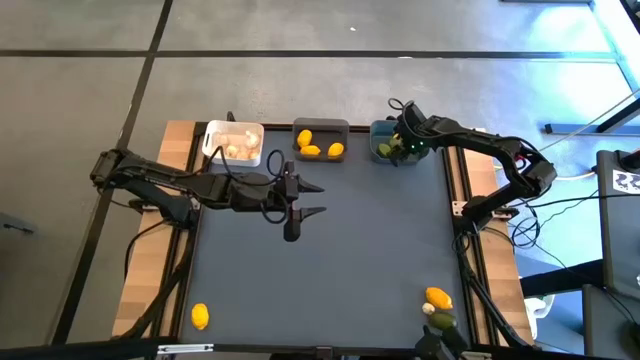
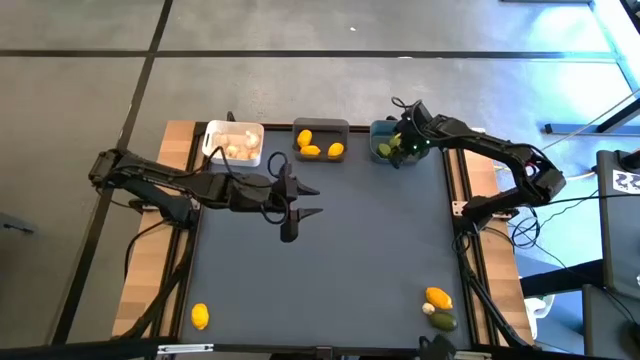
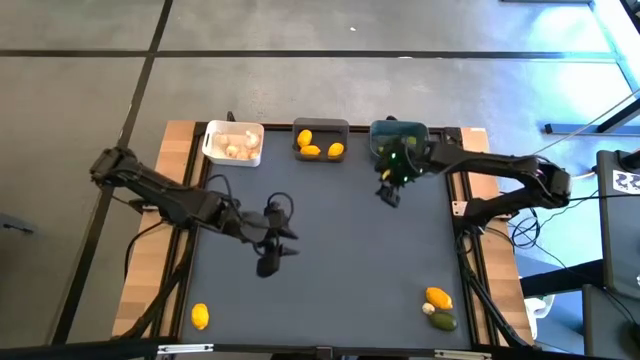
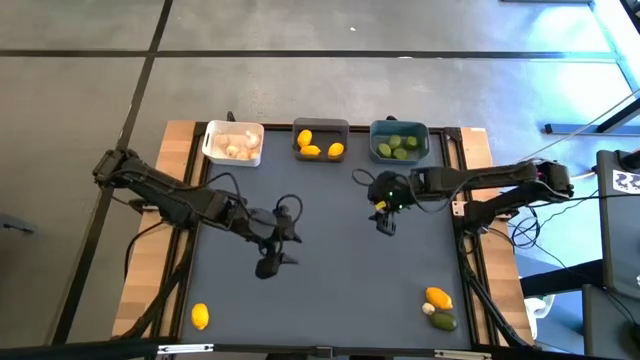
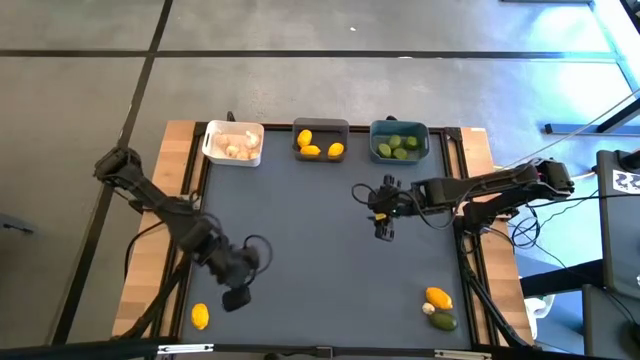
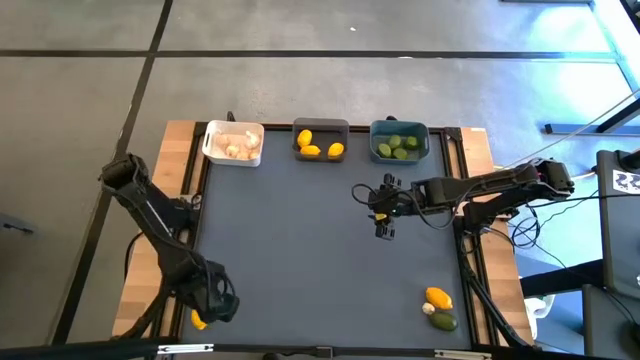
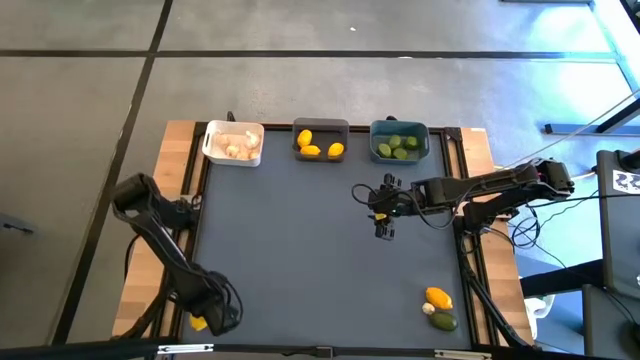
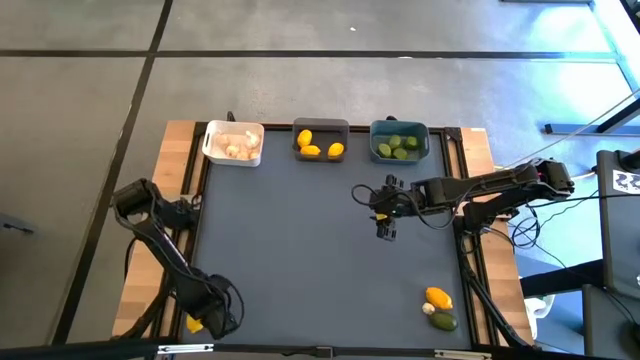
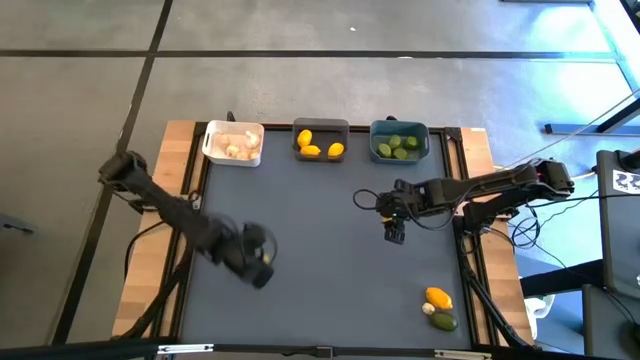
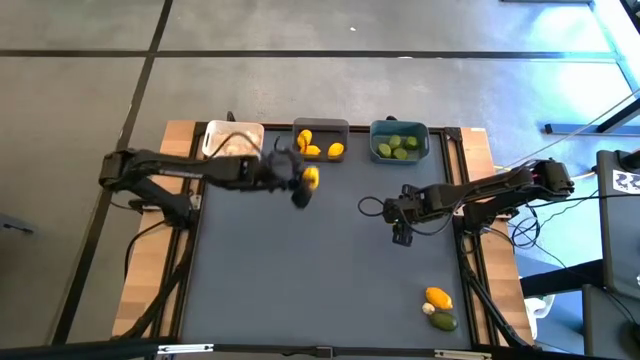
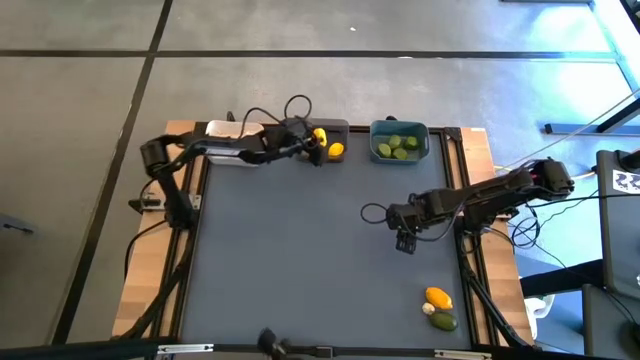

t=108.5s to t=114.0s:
Task: Sort produce into baskets
Put the lemon into the black bin

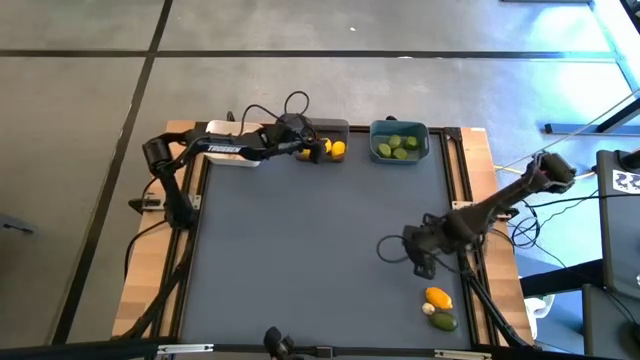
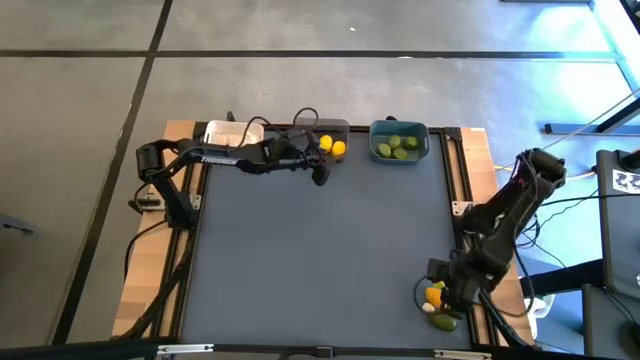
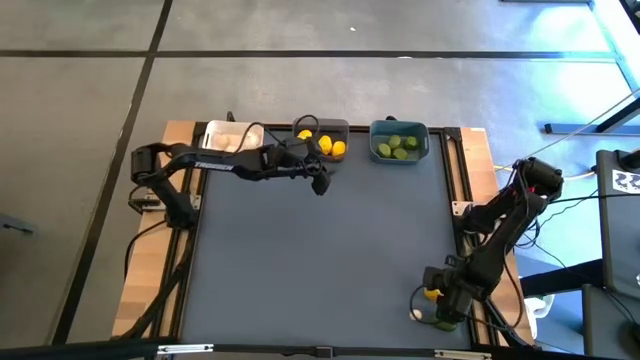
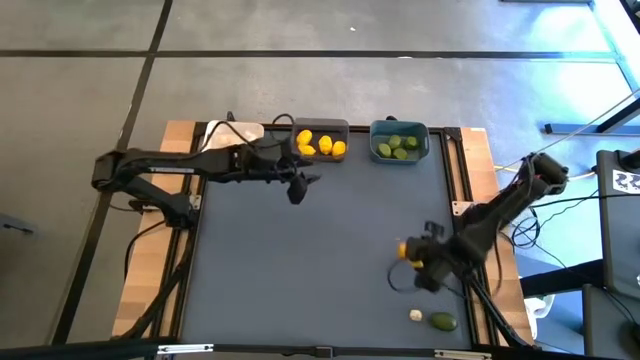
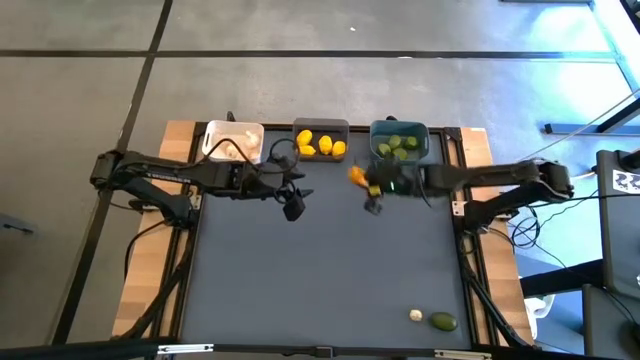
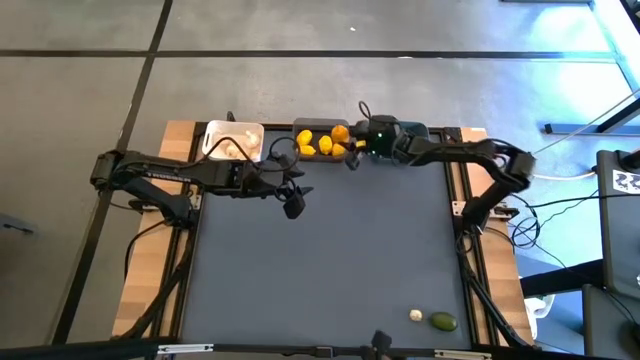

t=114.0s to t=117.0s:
Put the lemon into the black bin

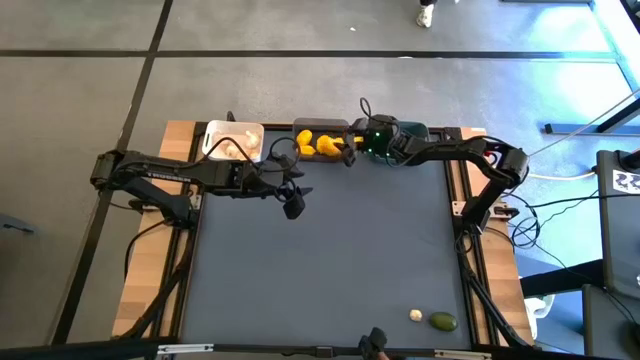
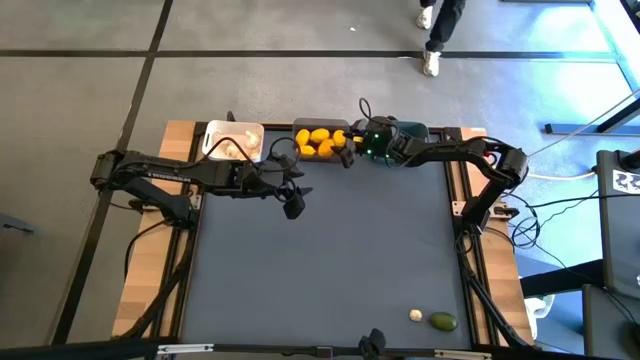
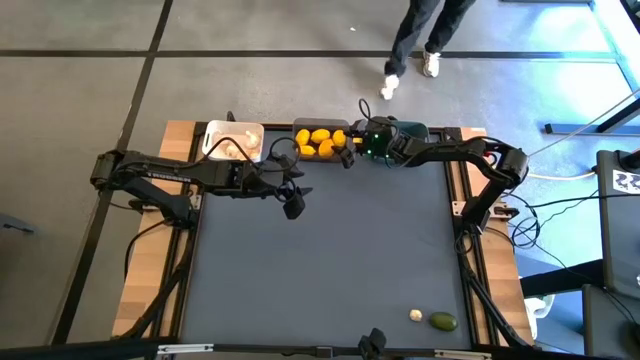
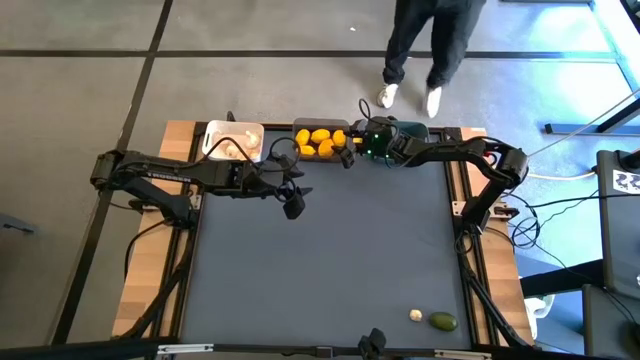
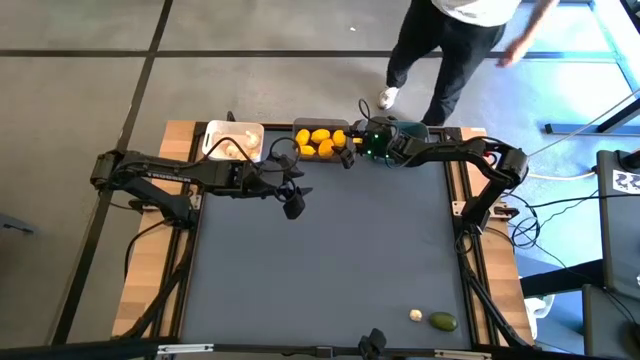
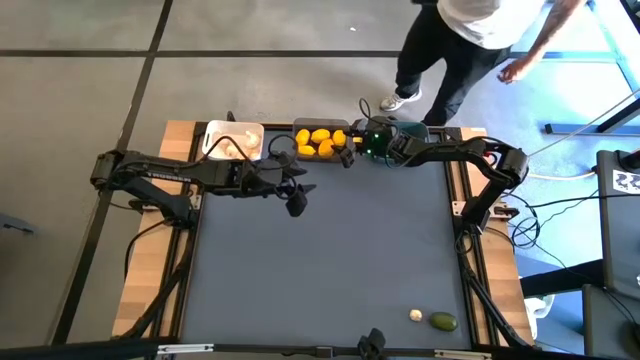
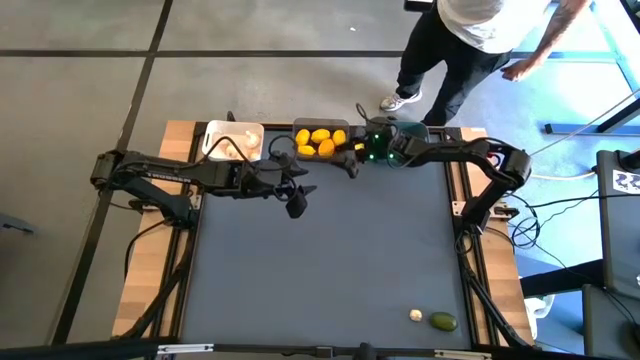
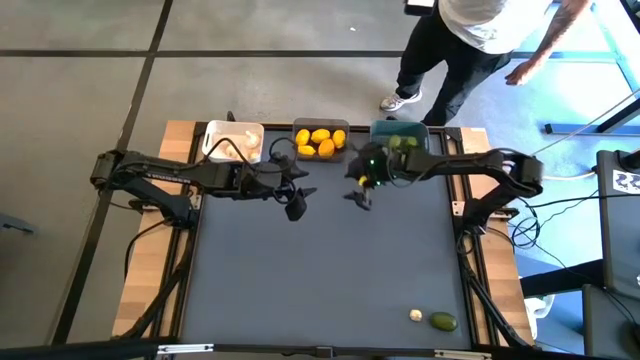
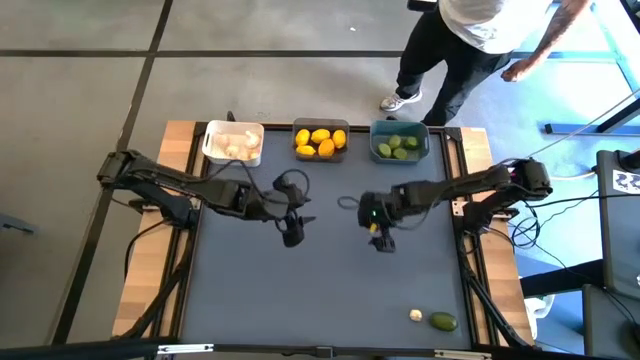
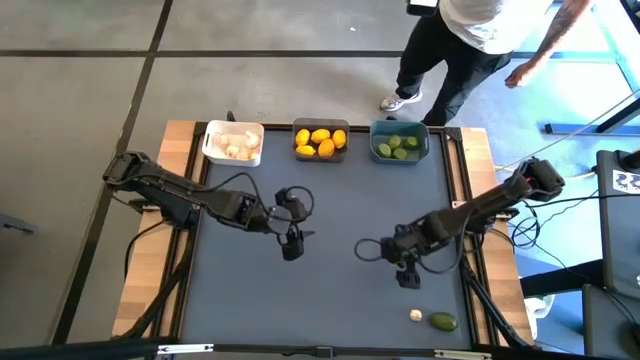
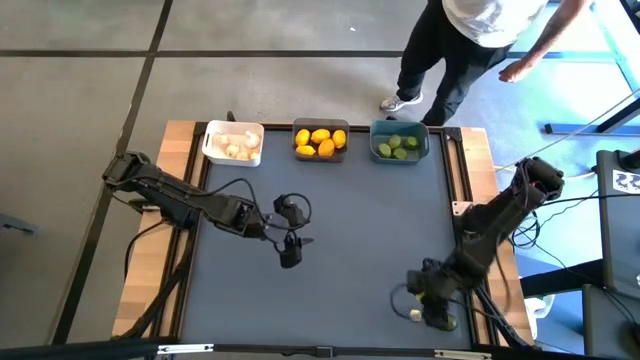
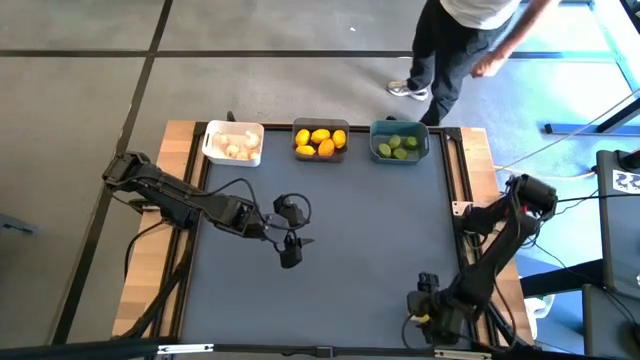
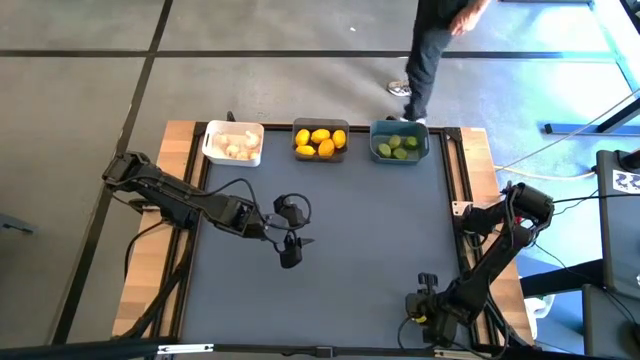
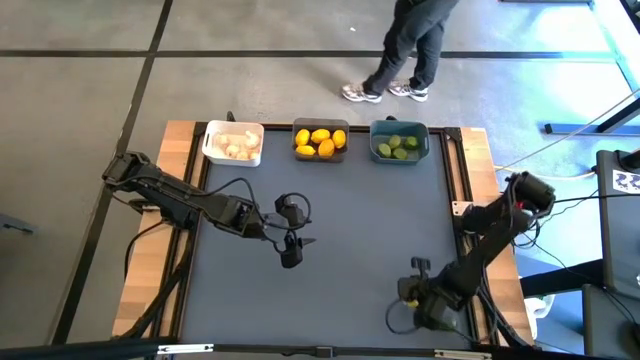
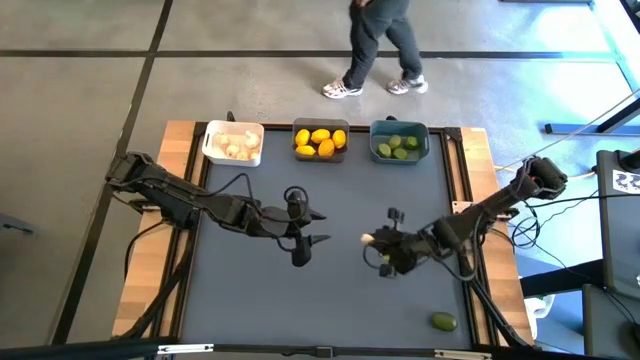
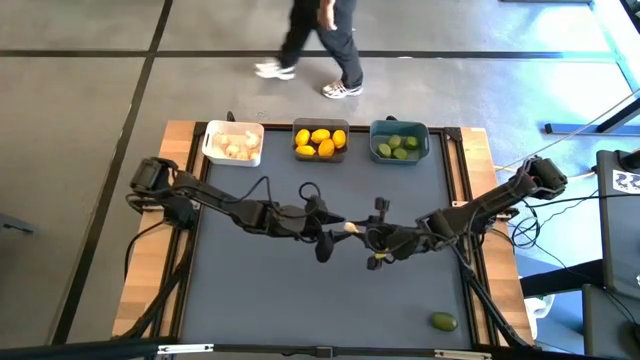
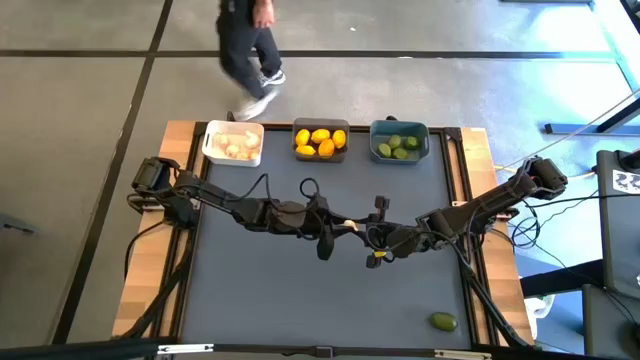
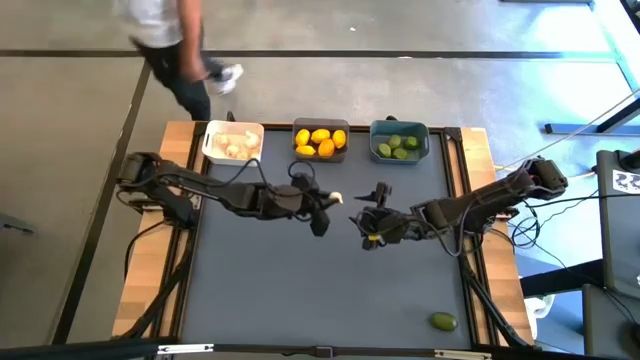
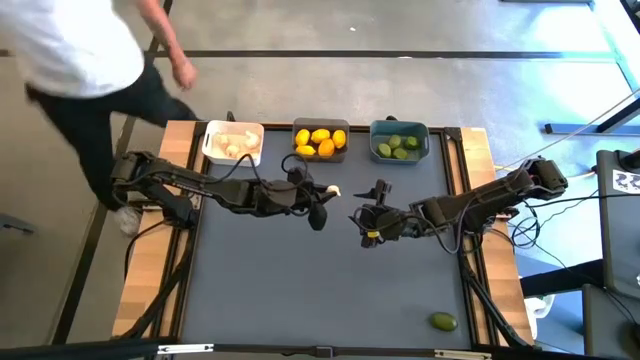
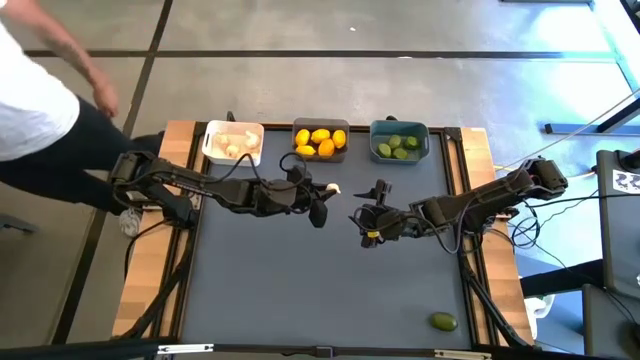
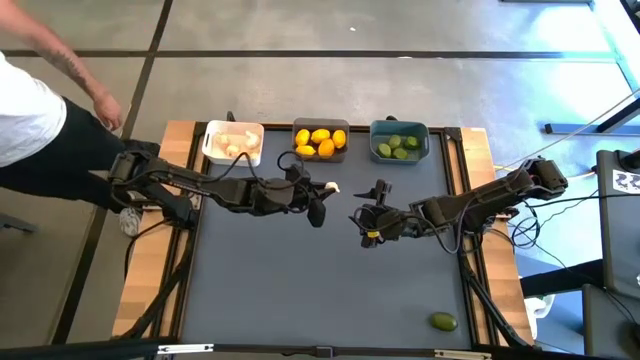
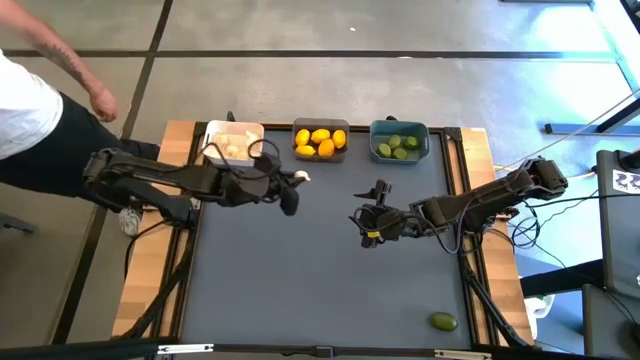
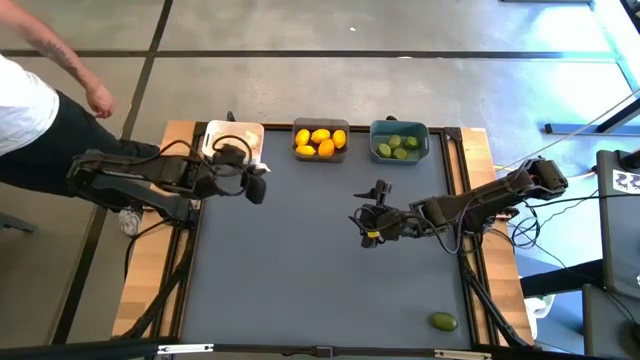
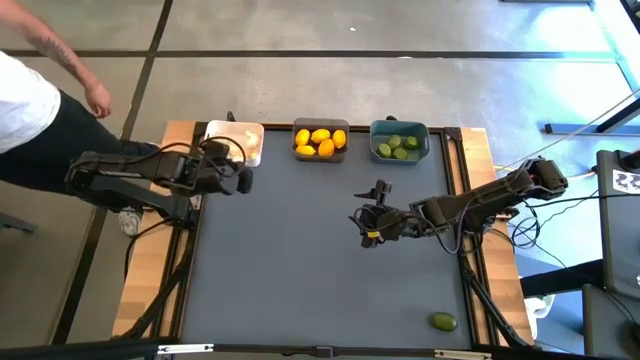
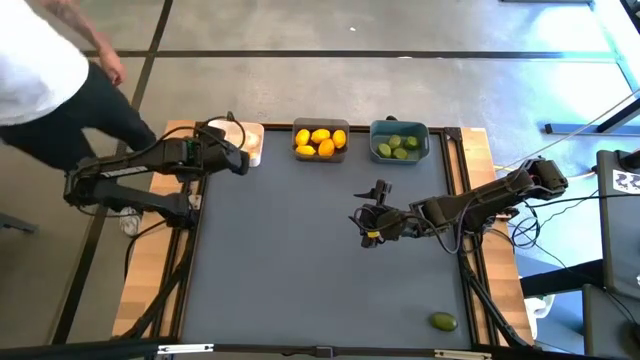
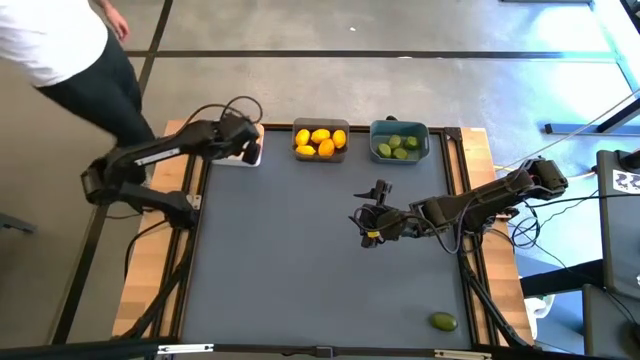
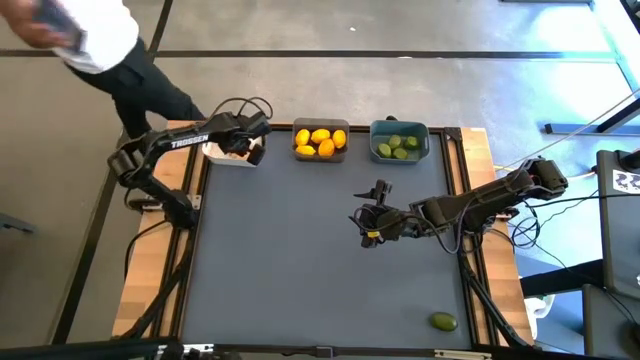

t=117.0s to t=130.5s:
Put the garlic into the white bin
